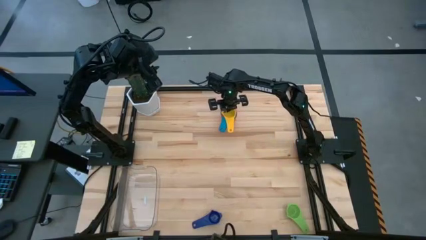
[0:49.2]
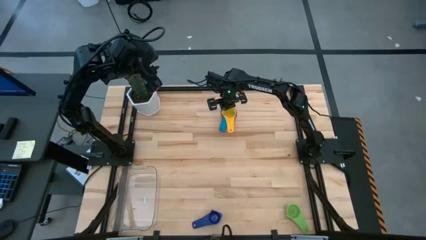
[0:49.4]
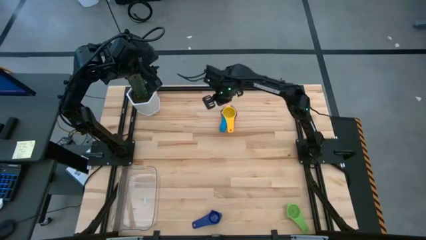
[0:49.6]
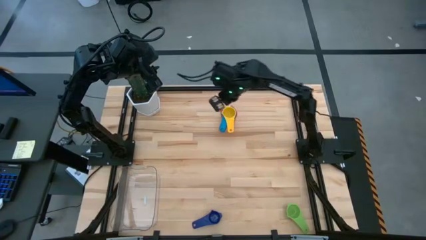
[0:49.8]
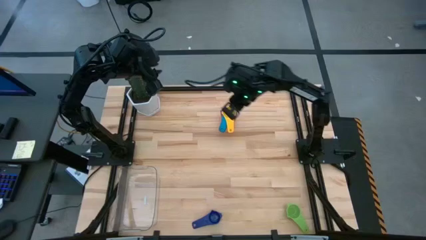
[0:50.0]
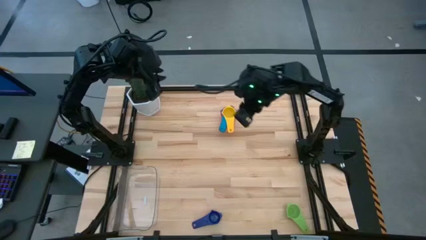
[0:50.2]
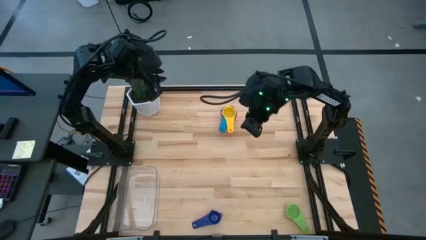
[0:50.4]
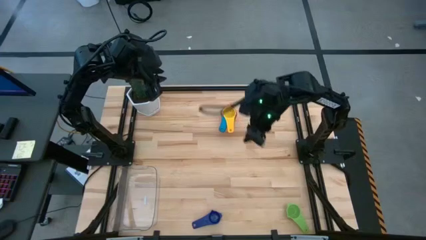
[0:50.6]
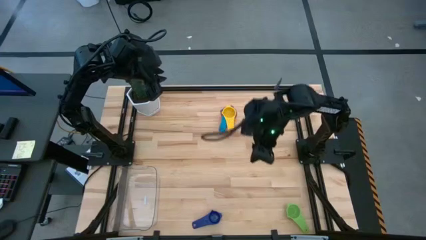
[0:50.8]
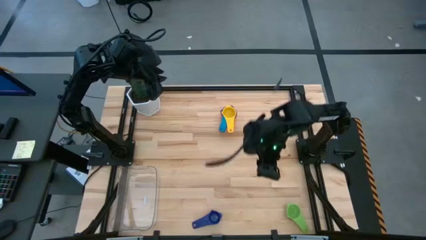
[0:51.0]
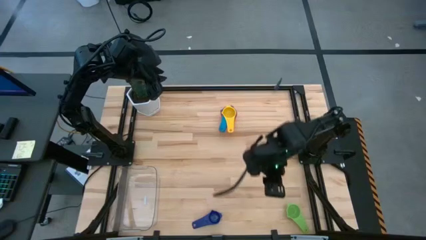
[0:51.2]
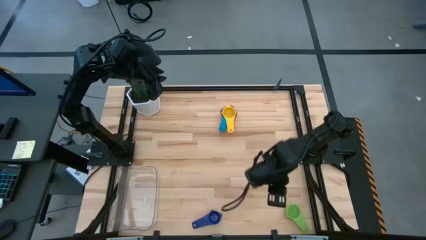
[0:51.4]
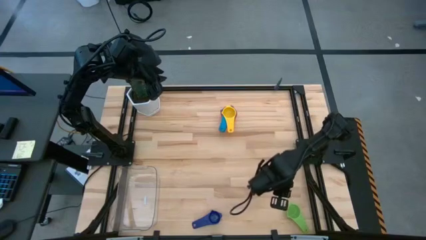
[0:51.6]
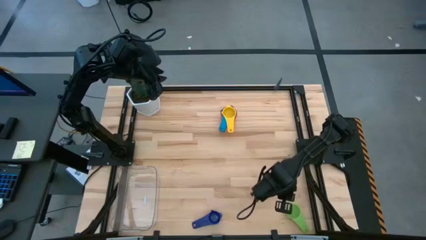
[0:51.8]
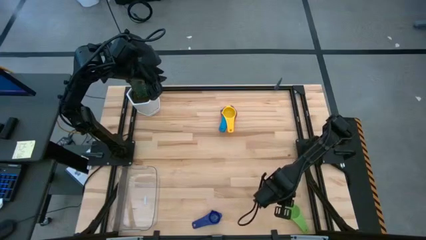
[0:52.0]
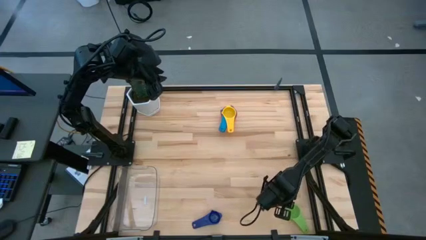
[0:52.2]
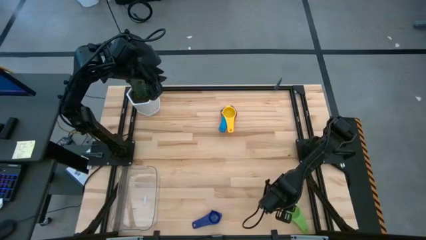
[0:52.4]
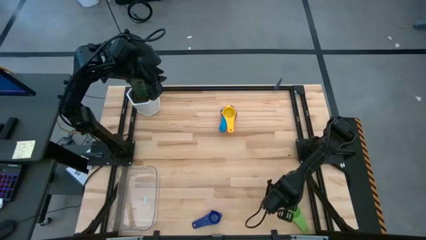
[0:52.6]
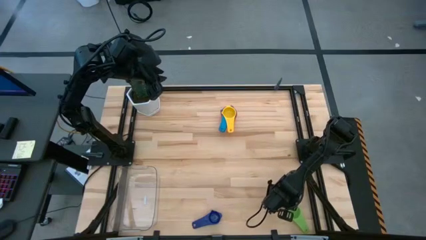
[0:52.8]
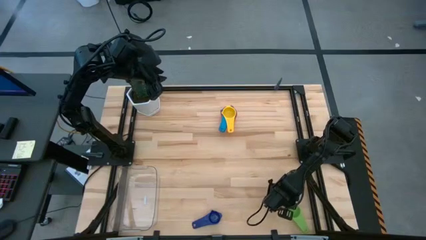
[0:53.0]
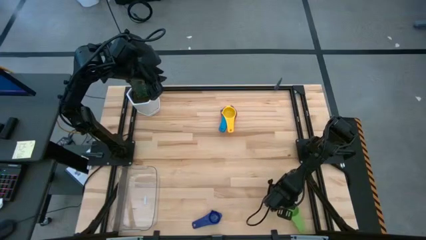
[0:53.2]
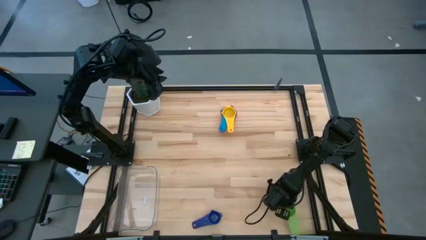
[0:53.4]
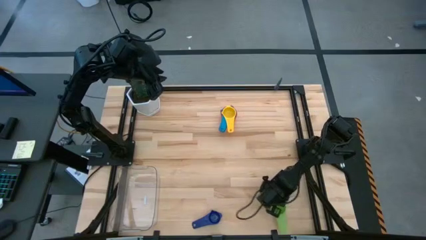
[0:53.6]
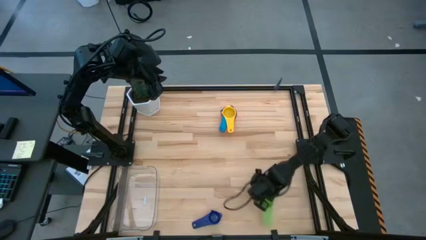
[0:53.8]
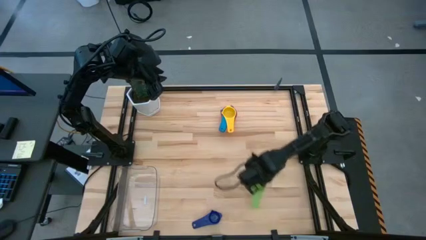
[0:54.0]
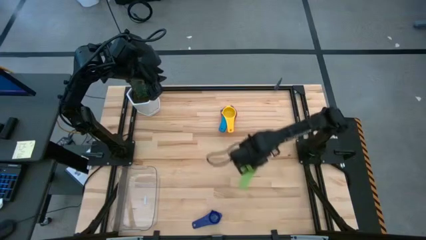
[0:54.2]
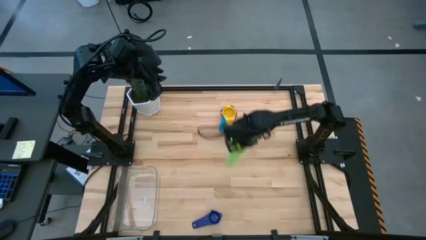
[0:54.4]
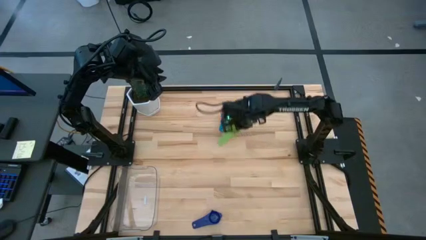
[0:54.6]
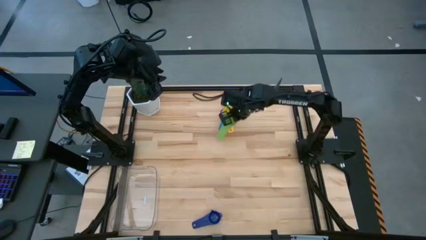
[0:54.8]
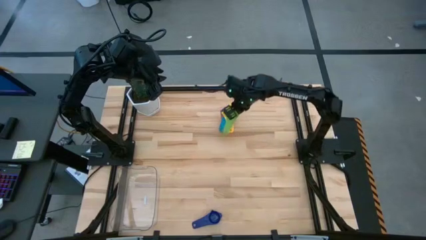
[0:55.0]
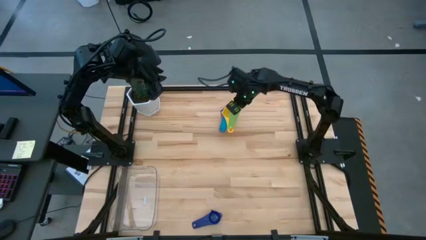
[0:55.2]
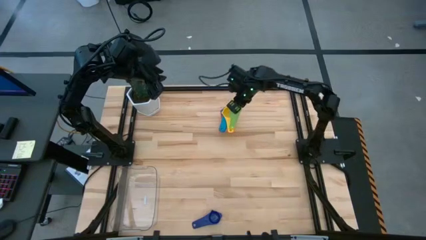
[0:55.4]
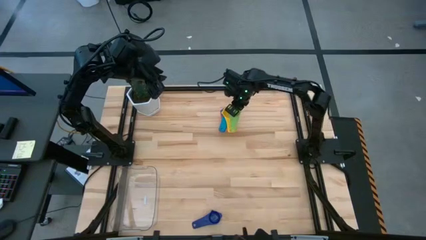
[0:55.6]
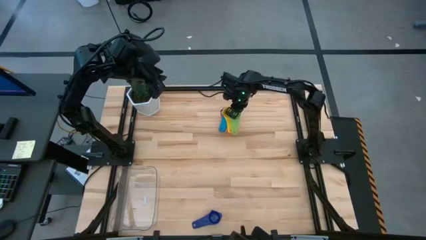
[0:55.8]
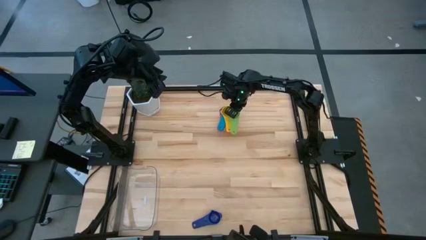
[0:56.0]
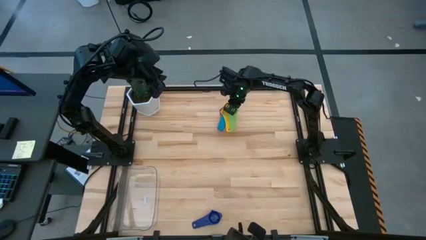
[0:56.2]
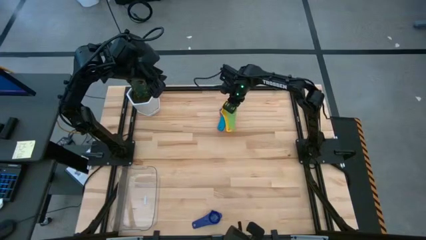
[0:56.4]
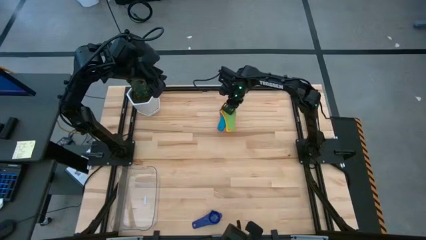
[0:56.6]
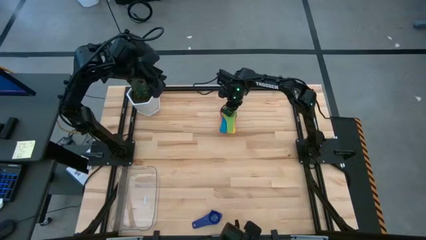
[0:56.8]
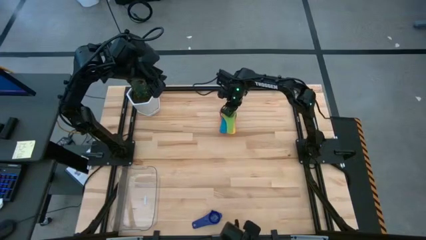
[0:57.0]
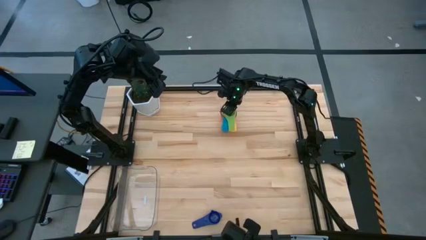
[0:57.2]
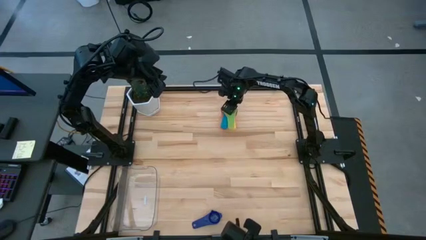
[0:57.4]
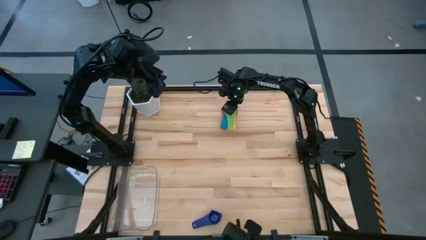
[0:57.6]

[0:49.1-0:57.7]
Task: Nest measuring cups in basket
Stack the green measuring cup on top of the yellow measuring cup

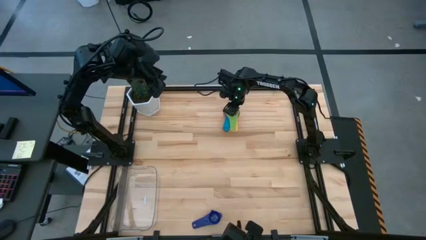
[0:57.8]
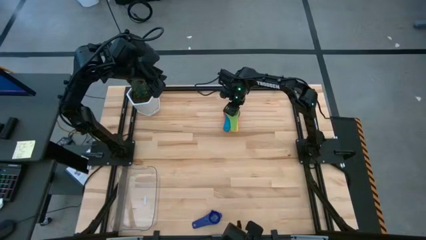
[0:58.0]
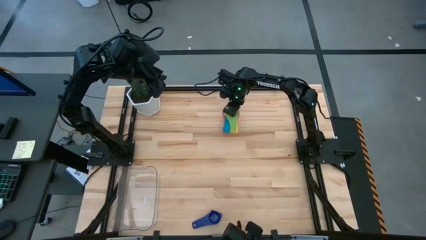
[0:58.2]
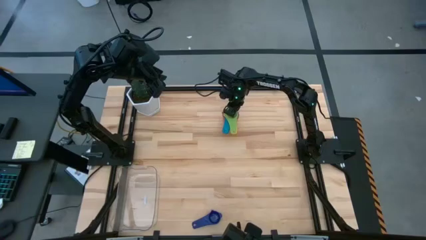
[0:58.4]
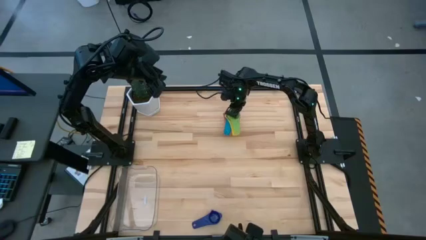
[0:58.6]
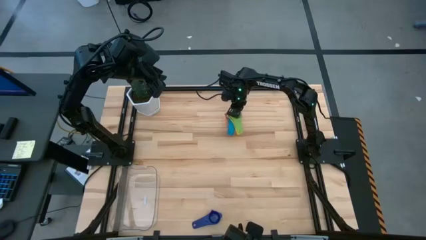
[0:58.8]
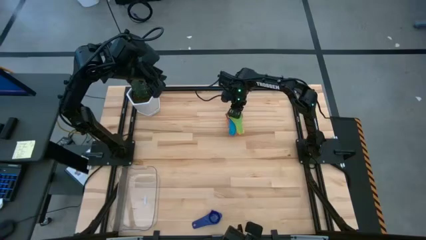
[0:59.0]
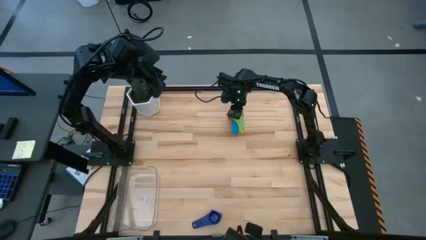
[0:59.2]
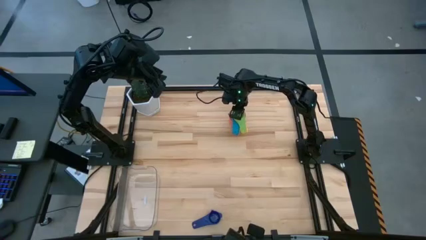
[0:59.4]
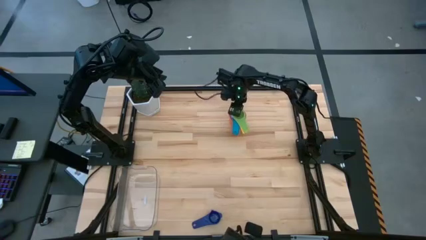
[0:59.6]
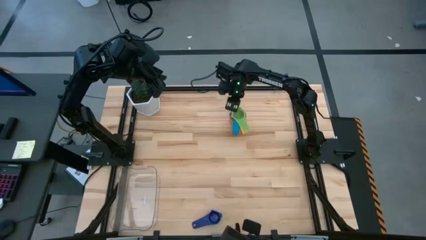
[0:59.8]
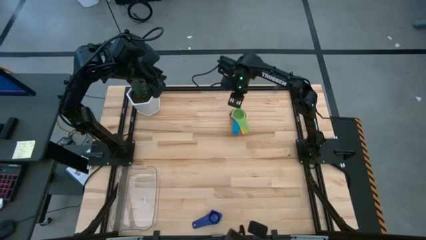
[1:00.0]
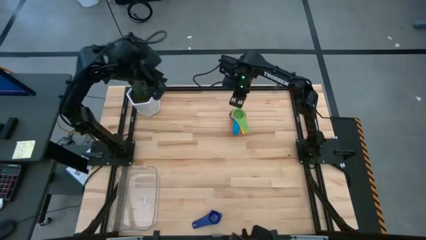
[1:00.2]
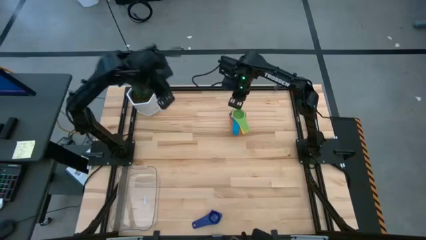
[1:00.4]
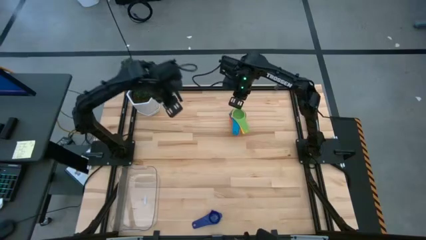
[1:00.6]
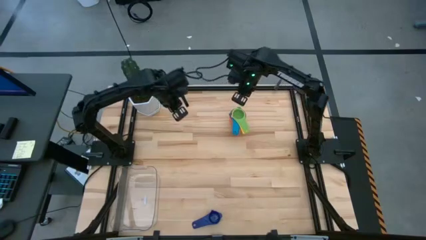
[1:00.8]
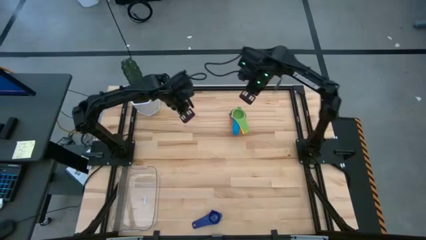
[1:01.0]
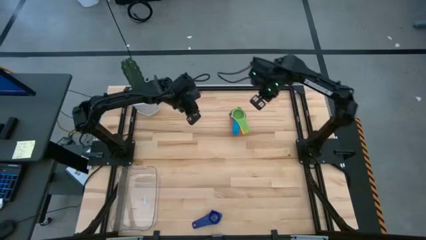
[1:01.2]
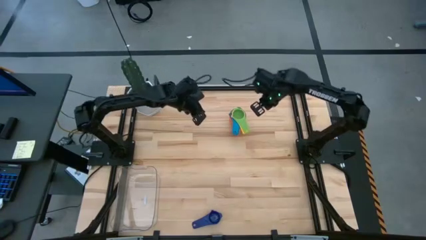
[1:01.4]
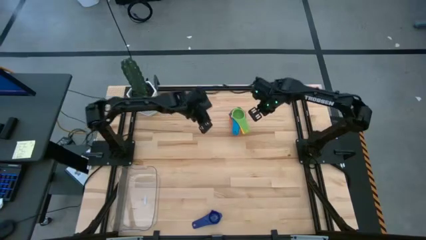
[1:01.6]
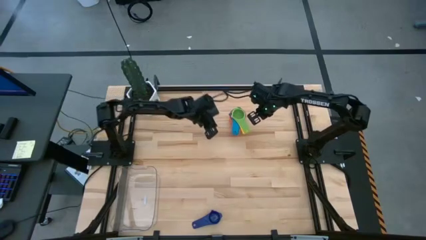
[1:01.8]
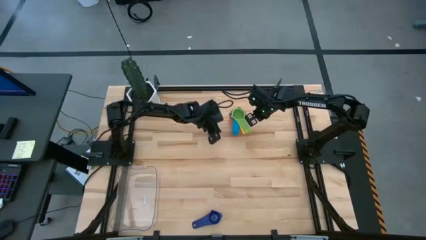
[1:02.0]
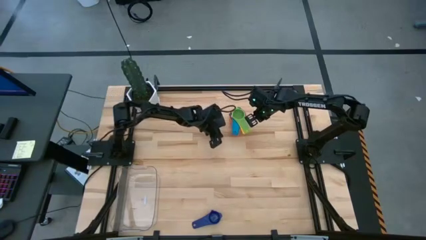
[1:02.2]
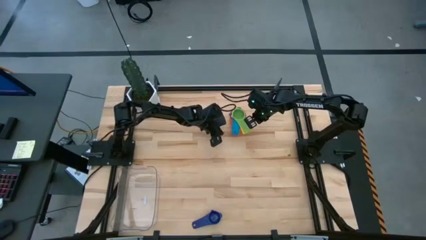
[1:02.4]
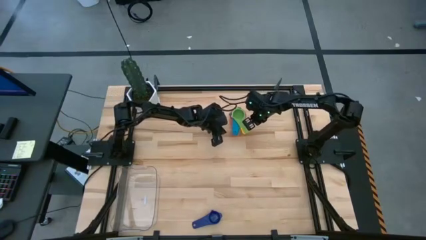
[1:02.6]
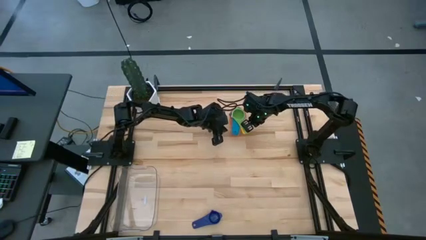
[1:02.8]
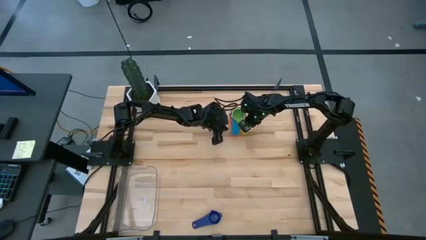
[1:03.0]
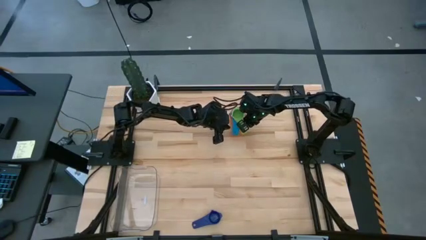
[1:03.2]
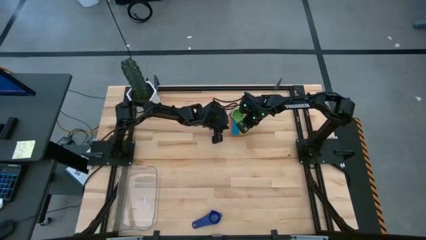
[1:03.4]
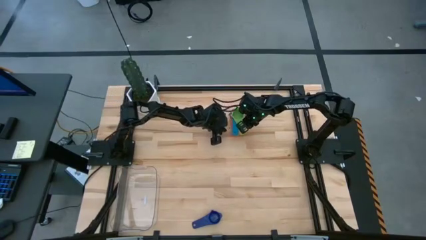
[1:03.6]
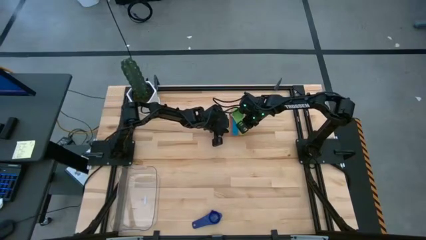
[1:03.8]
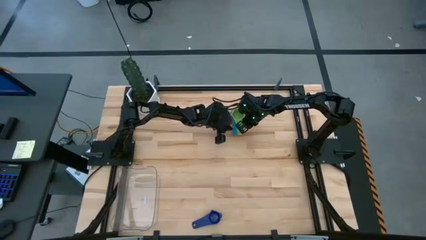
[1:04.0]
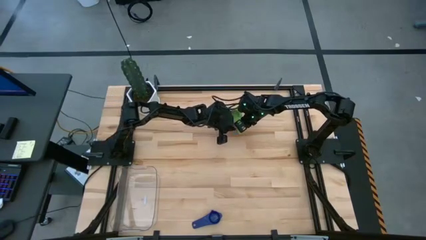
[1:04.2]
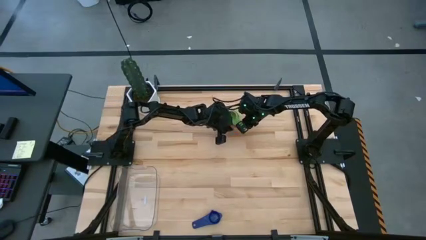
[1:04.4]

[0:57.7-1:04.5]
Stack the green measuring cup on top of the yellow measuring cup
